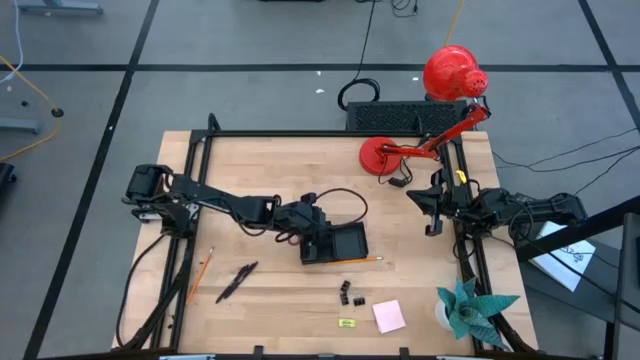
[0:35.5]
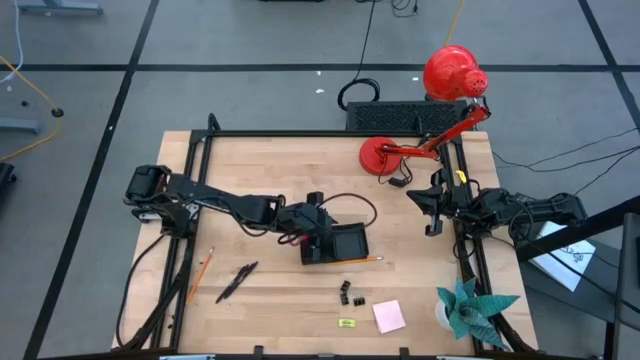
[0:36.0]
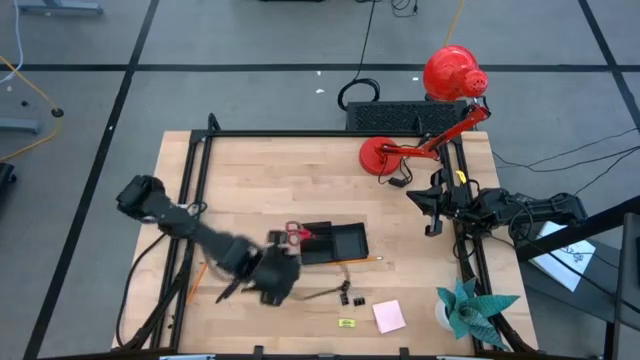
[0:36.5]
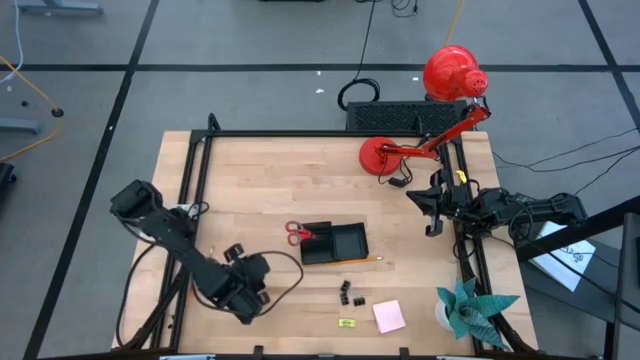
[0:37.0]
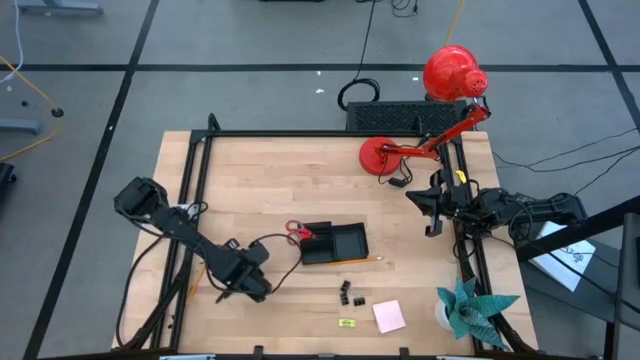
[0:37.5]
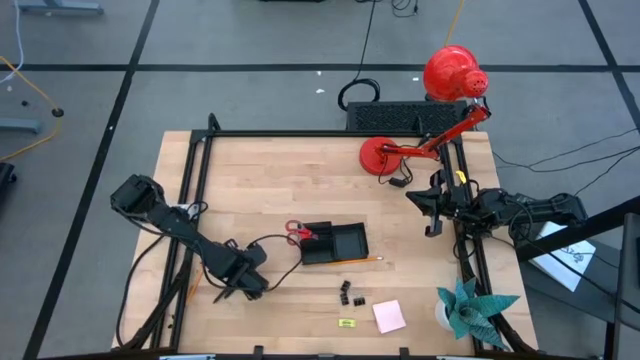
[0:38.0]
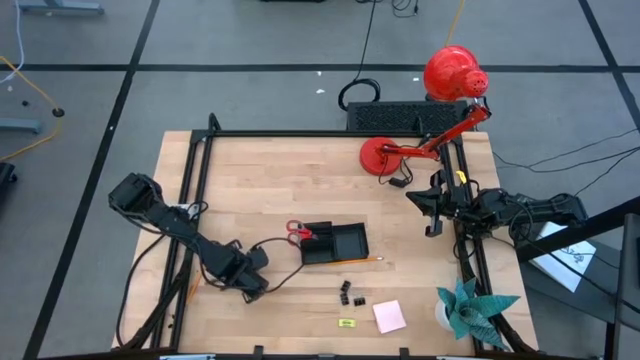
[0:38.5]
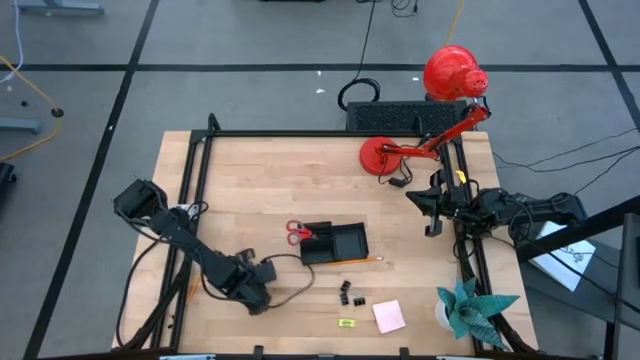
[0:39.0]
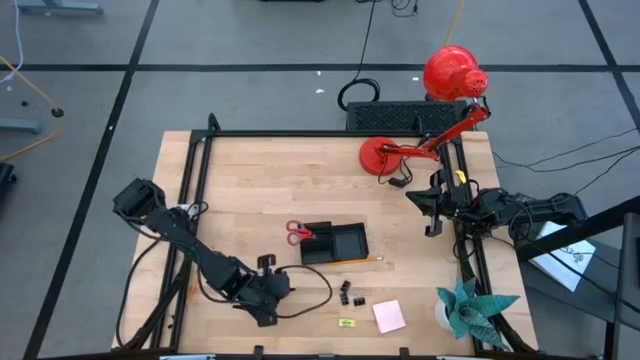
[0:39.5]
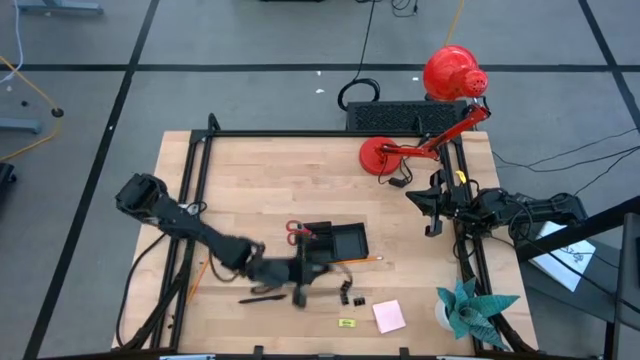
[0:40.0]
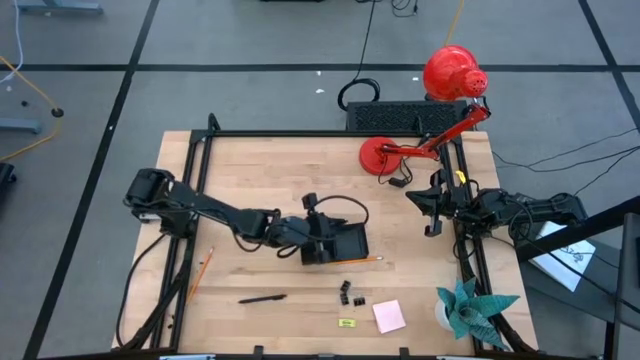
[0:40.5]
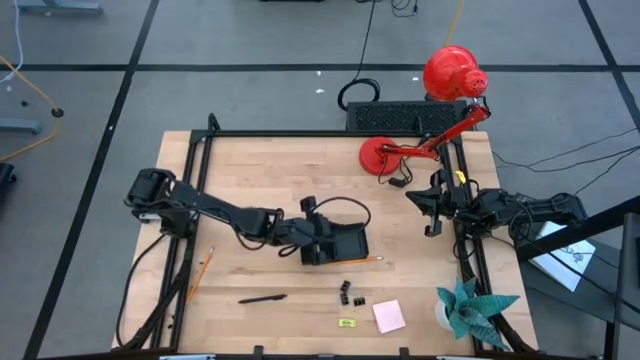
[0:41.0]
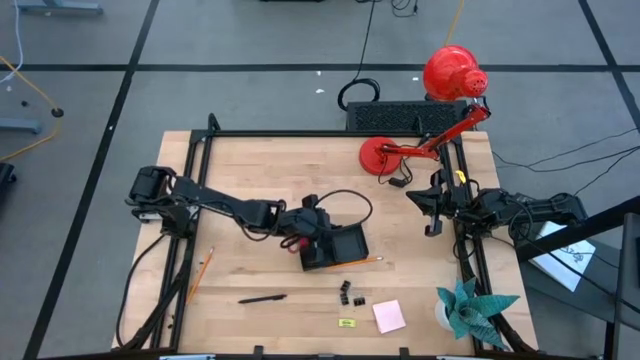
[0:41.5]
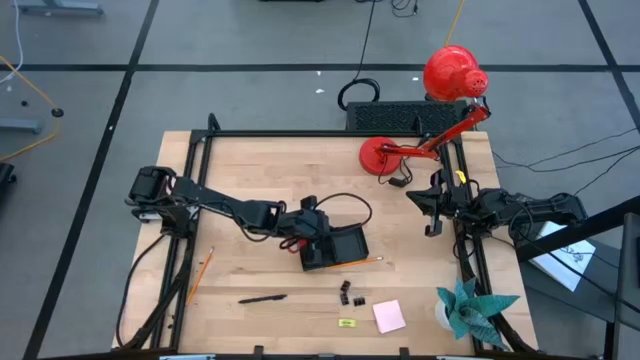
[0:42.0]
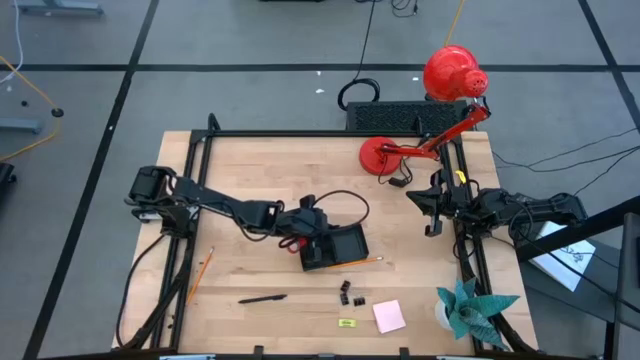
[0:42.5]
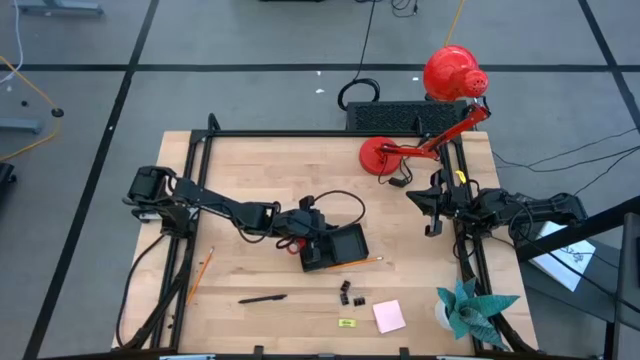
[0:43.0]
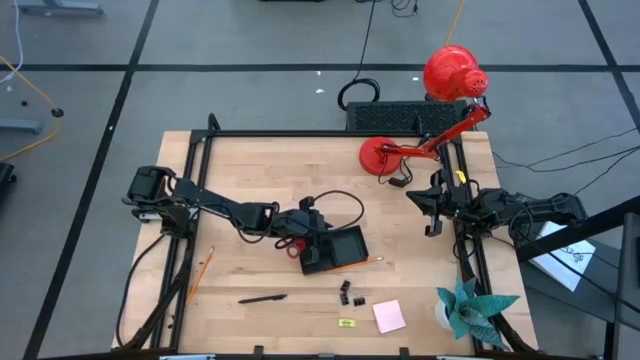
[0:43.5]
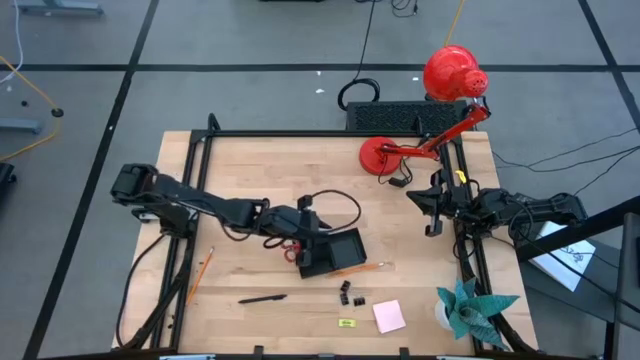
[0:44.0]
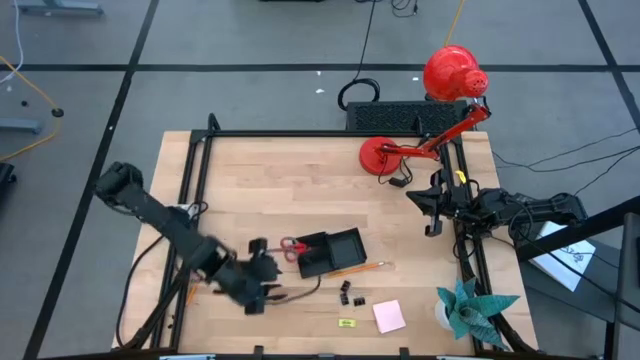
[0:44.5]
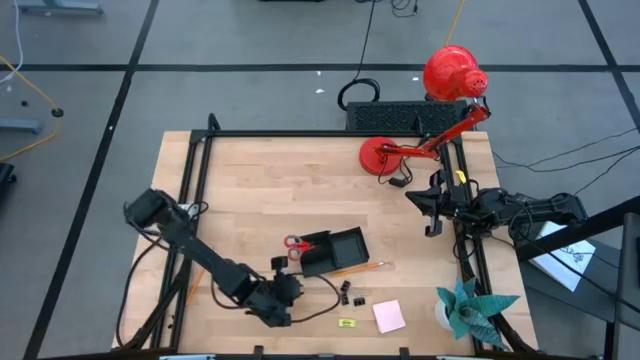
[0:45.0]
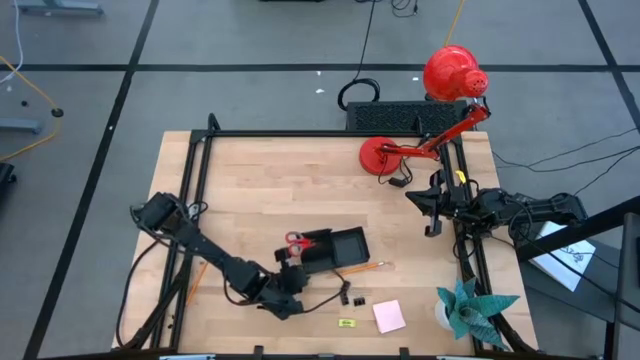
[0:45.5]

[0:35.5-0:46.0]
Task: Pick and place office supplies into organizer
Put the left pen into the top left compartment of the desk organizer

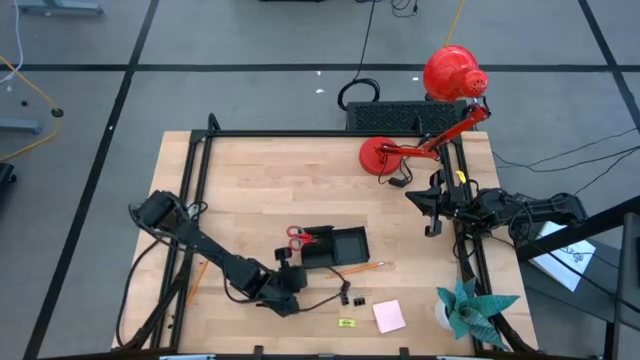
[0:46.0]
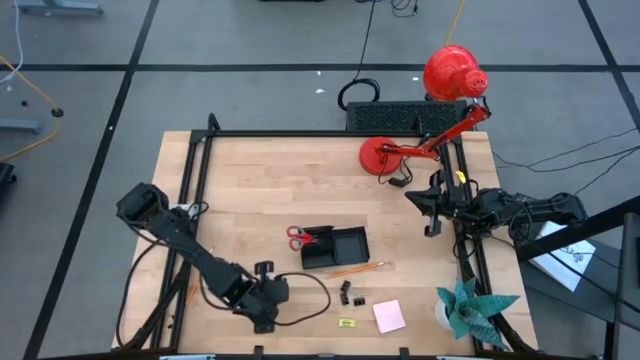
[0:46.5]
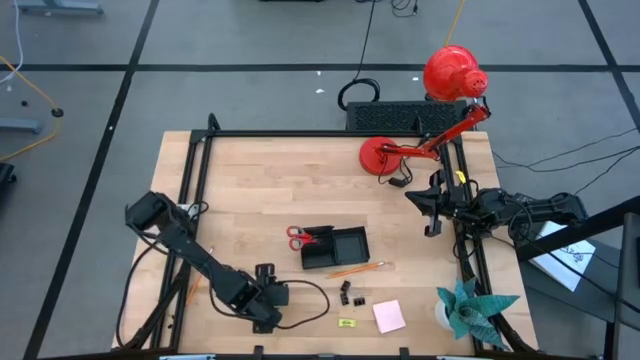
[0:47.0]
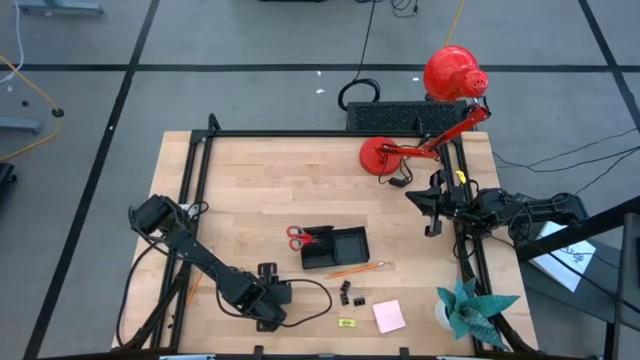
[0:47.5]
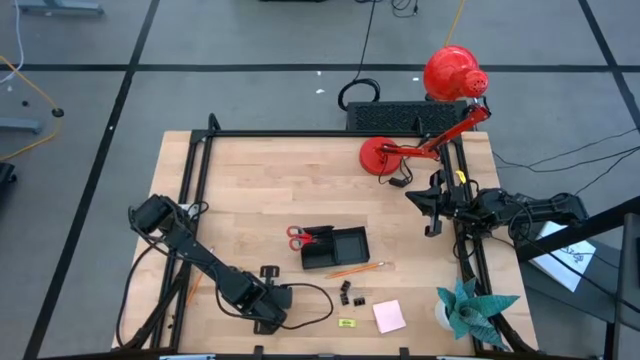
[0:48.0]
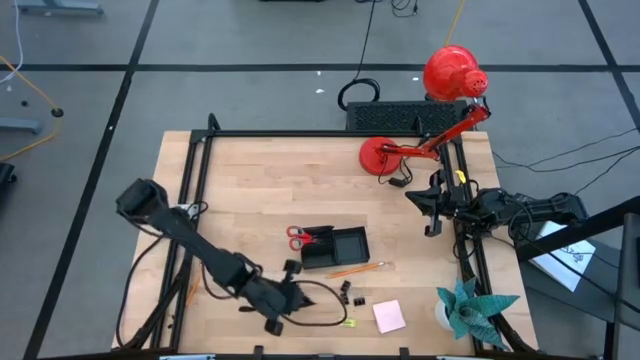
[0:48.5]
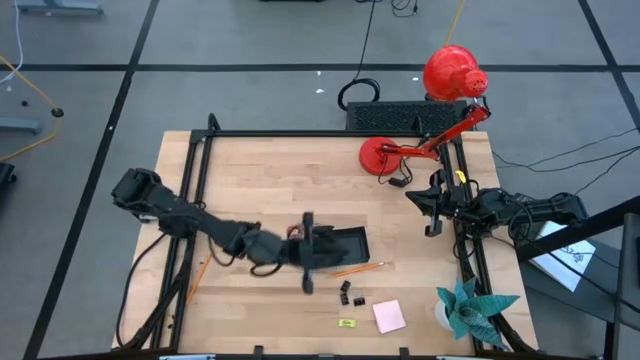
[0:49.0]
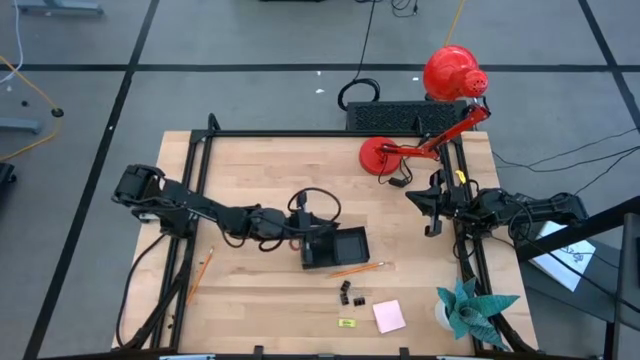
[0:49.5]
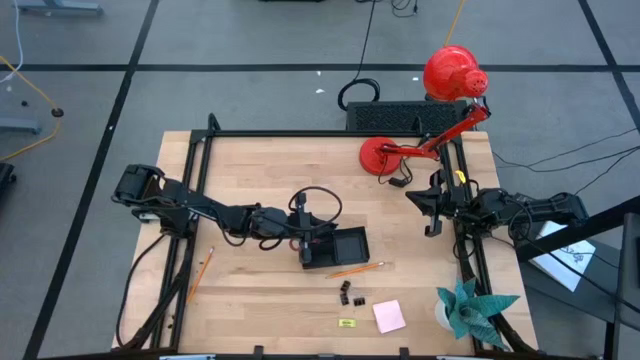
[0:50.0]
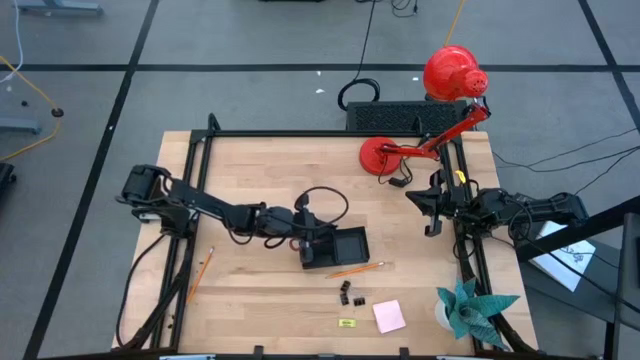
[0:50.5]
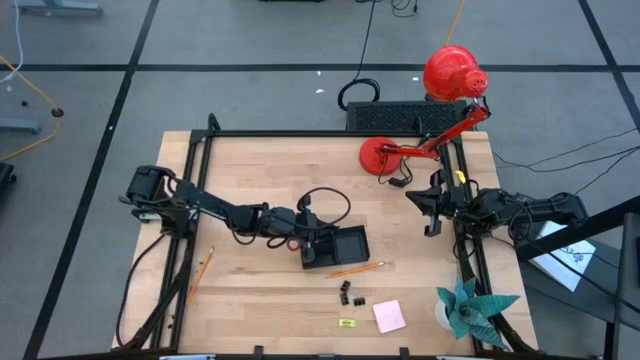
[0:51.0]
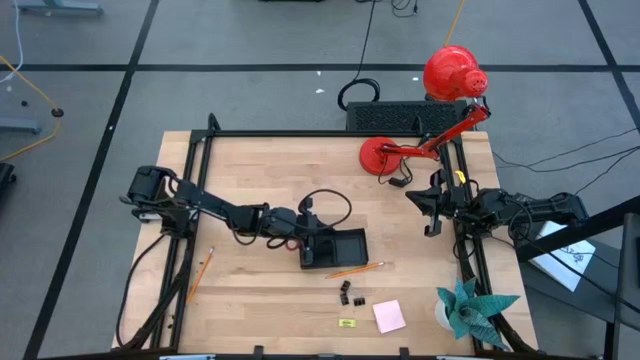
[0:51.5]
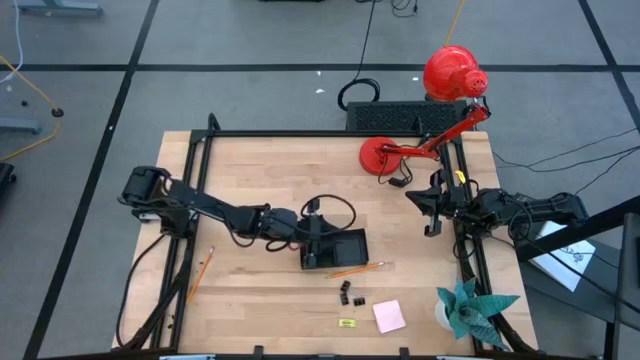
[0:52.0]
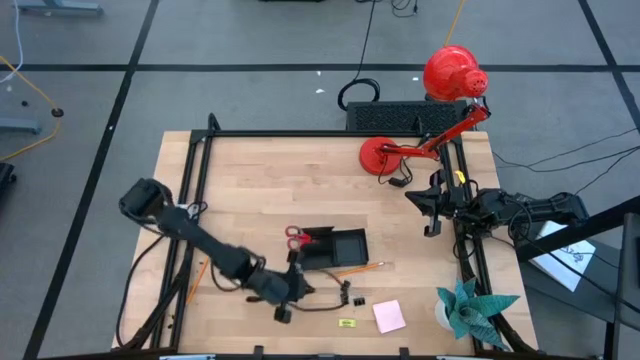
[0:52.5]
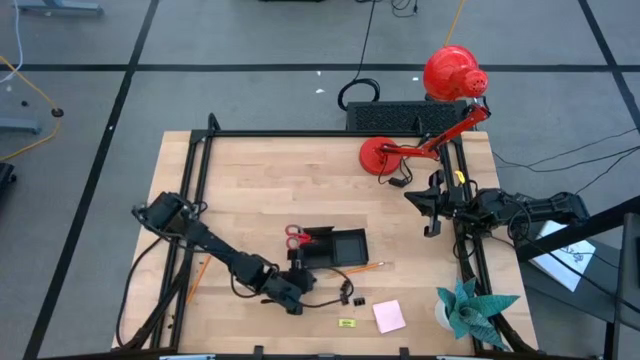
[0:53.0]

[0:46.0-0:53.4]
Put the pen into the top left compartment of the desk organizer

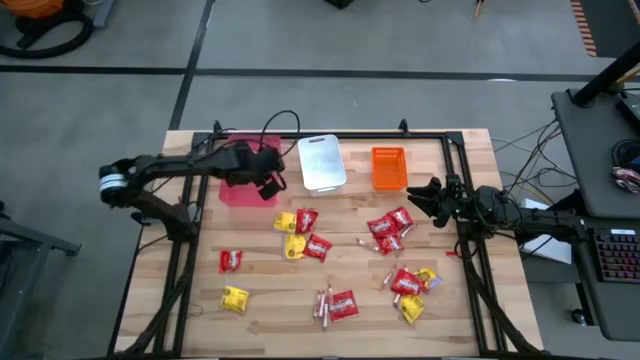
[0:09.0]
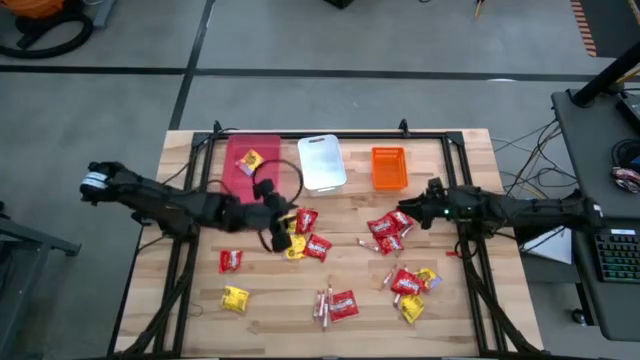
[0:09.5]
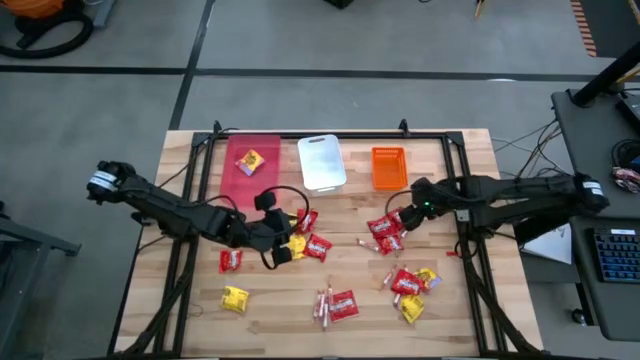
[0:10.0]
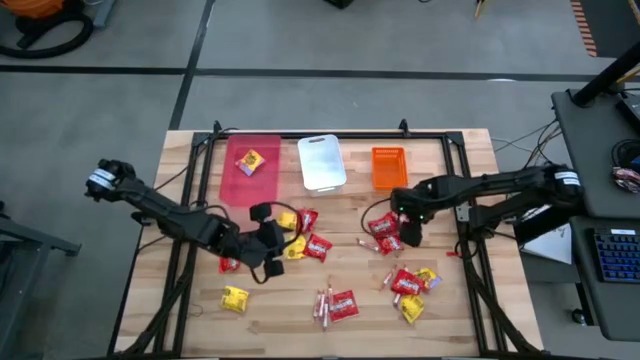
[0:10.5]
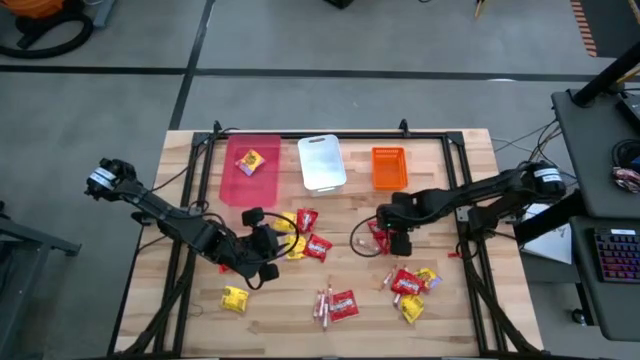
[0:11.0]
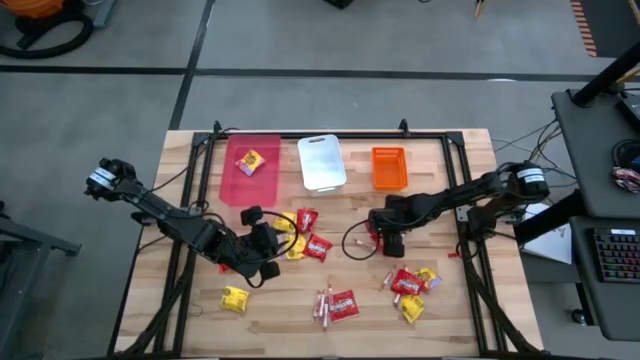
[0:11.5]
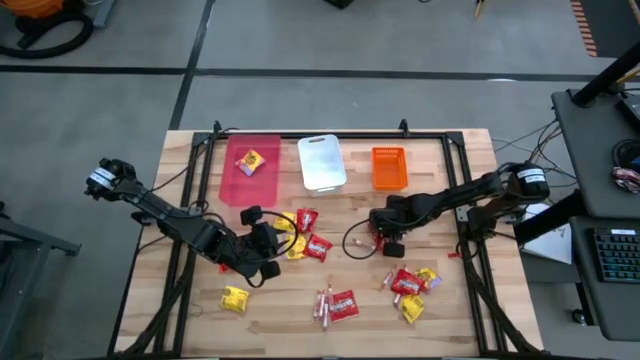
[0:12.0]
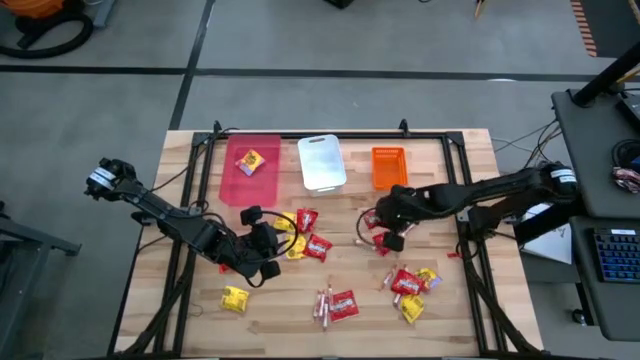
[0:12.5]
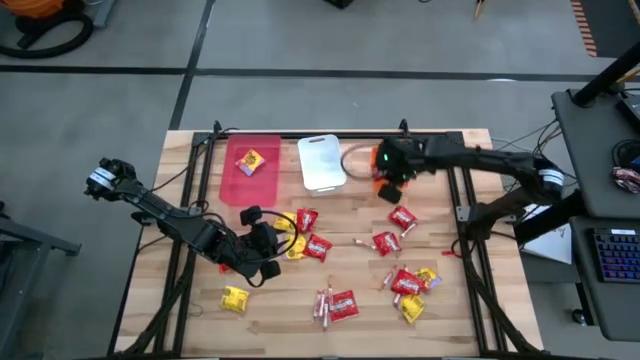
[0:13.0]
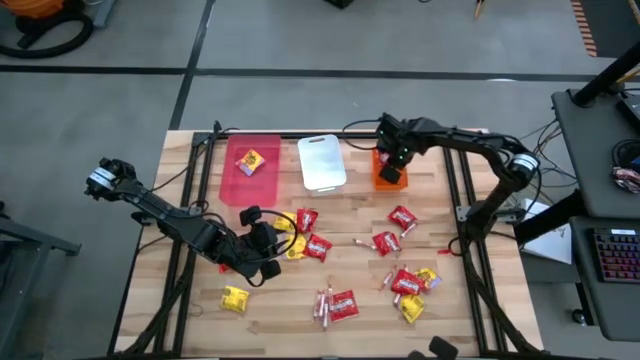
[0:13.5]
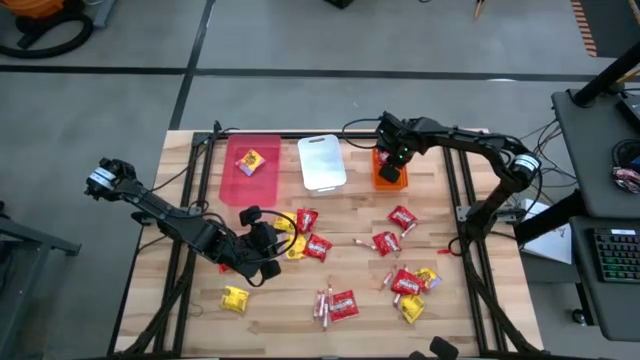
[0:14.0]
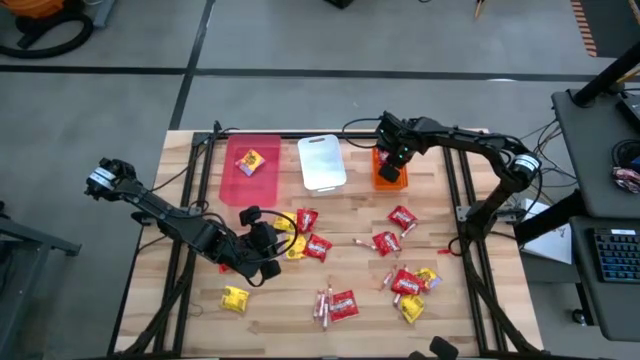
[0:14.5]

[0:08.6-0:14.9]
Task: Sort candy
Put the red candy into the orange bin
